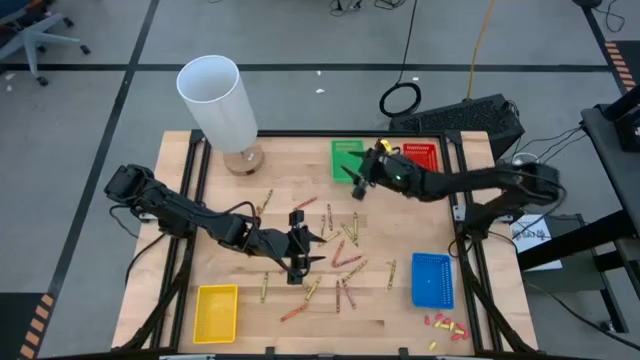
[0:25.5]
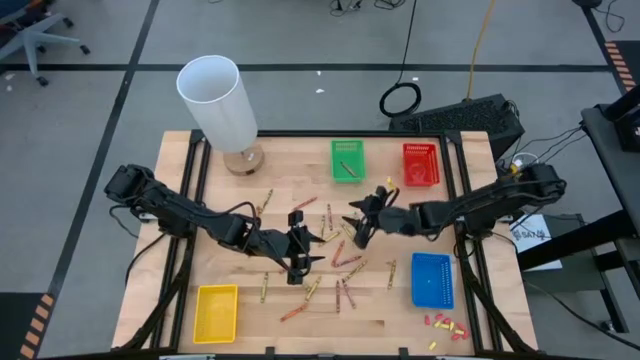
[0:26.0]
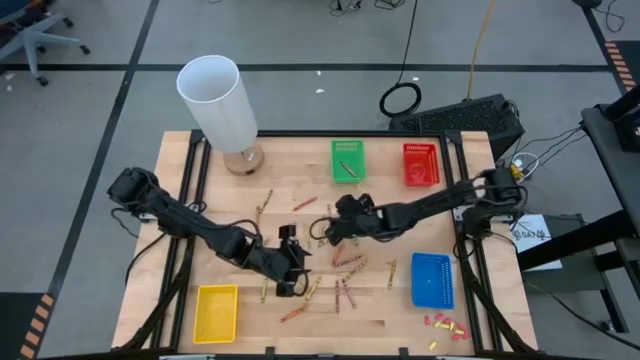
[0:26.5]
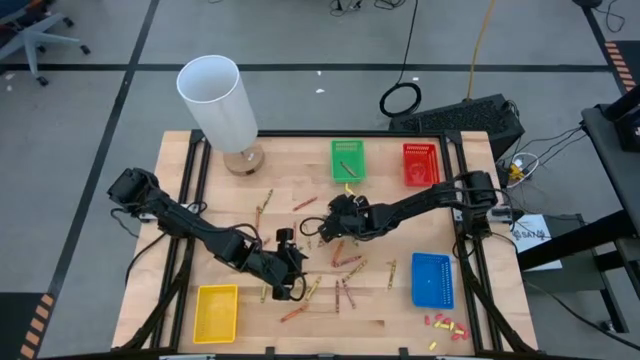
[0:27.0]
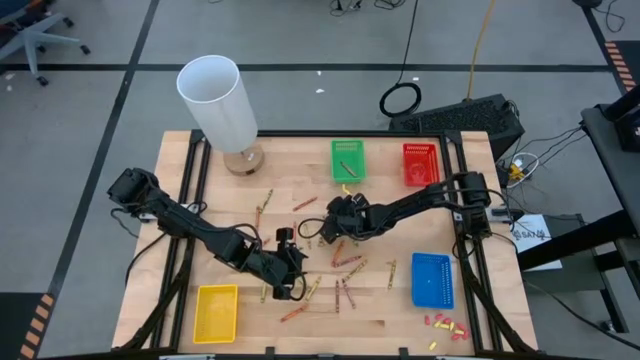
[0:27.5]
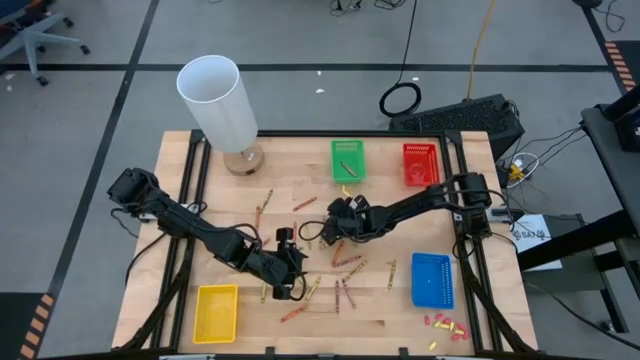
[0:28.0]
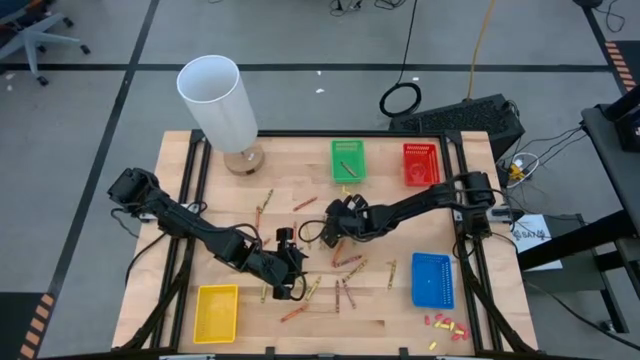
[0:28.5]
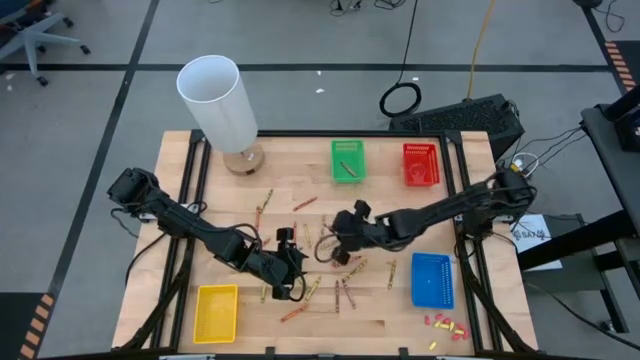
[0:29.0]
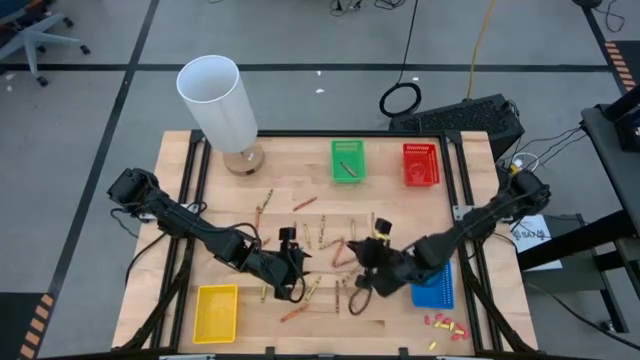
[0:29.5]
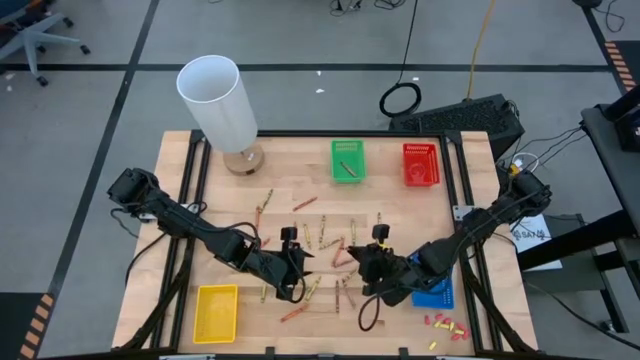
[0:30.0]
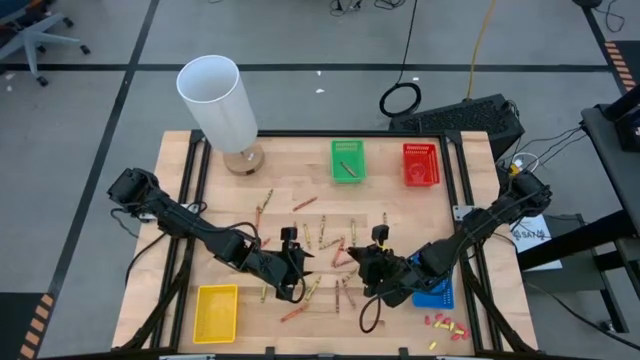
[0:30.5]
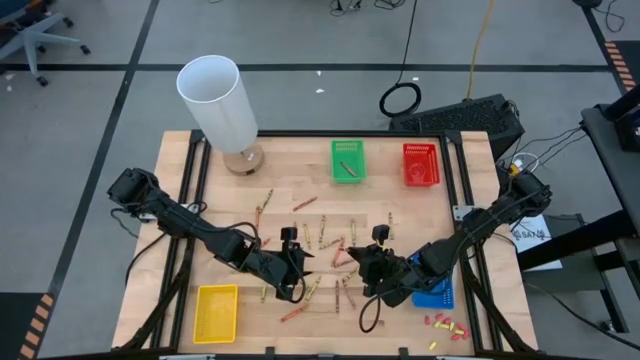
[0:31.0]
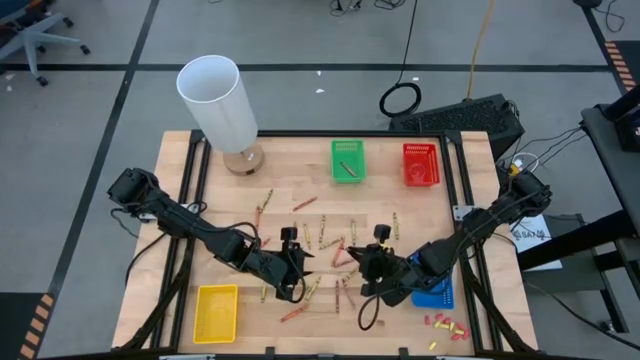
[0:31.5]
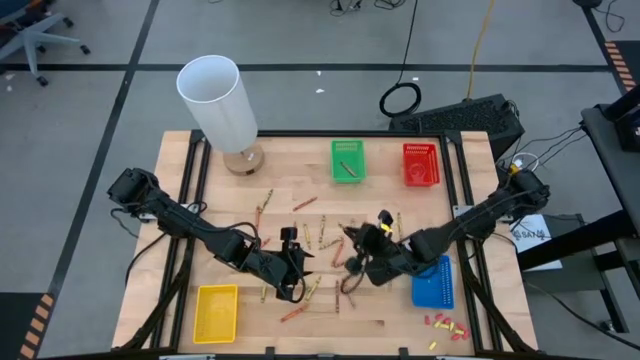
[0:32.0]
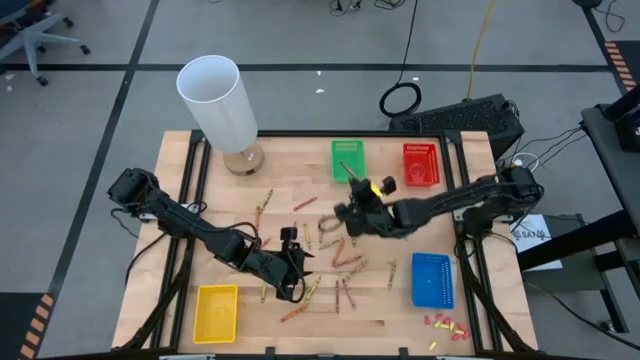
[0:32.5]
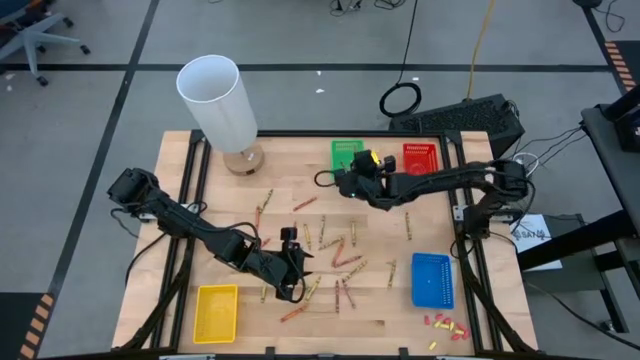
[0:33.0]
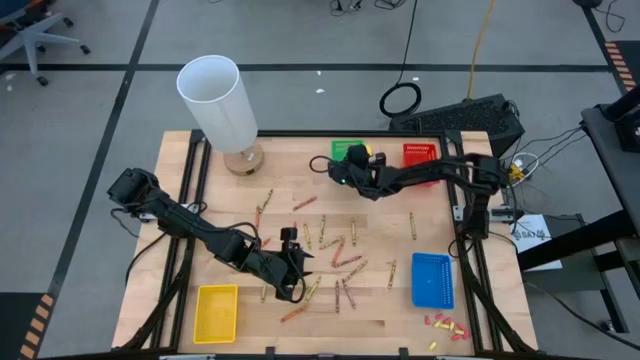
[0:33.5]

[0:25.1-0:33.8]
Task: Sort crayons
Put the red crayon into the green bin

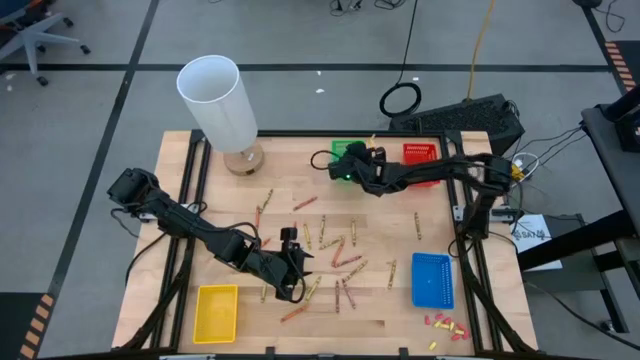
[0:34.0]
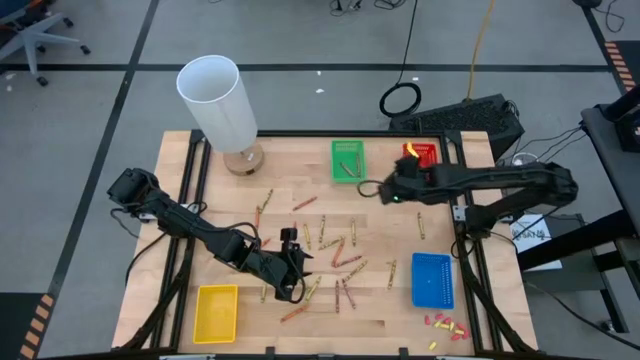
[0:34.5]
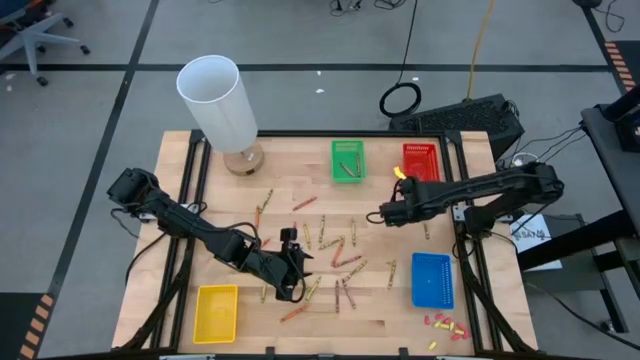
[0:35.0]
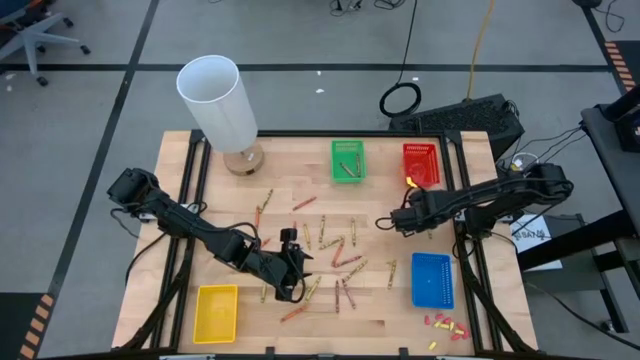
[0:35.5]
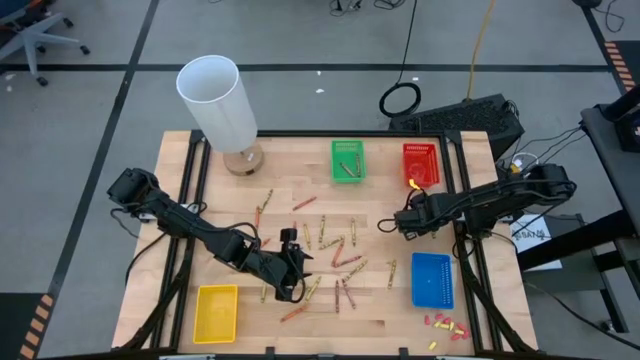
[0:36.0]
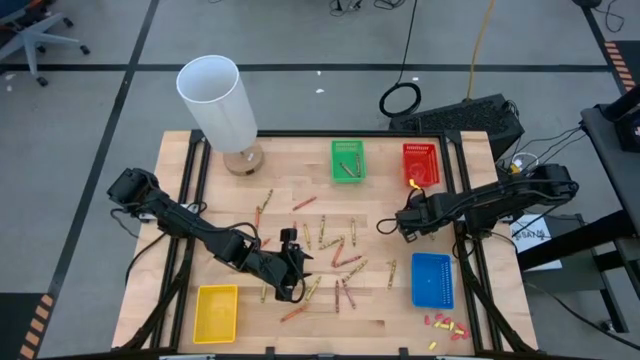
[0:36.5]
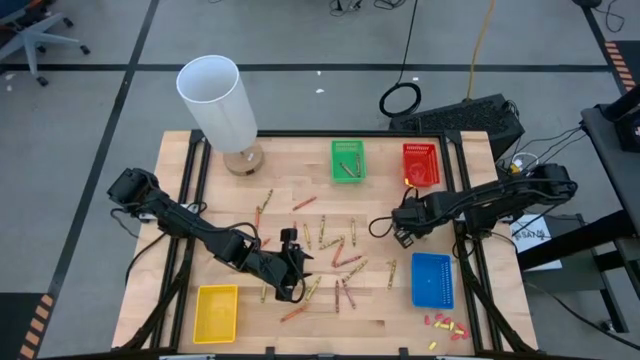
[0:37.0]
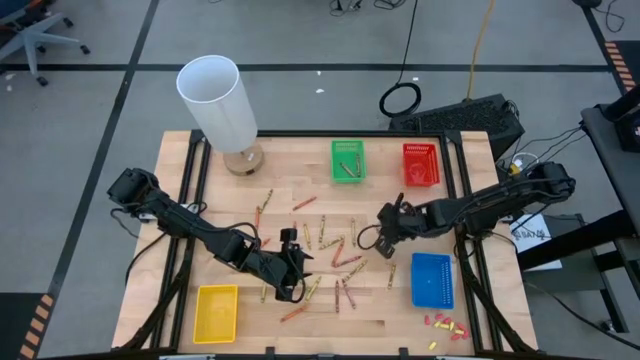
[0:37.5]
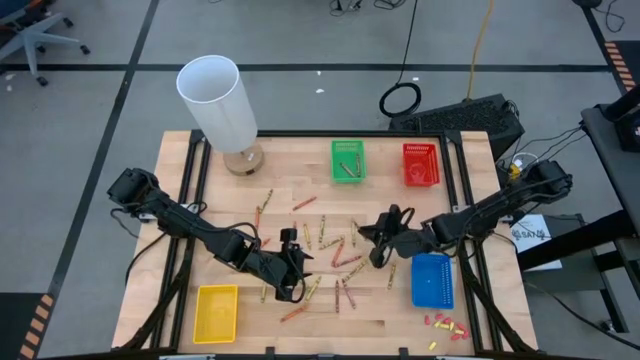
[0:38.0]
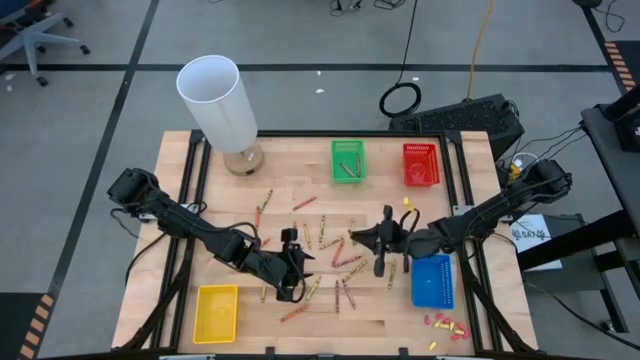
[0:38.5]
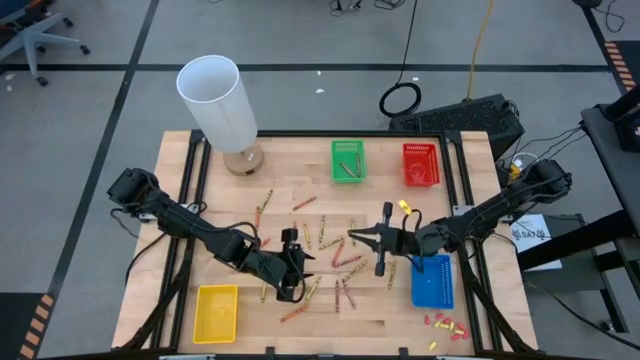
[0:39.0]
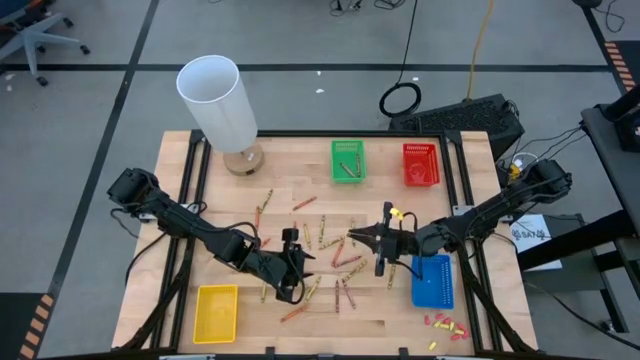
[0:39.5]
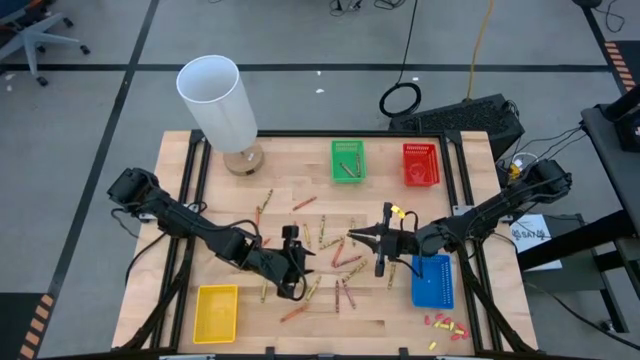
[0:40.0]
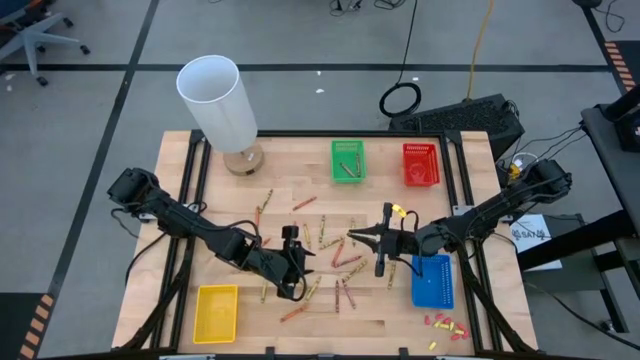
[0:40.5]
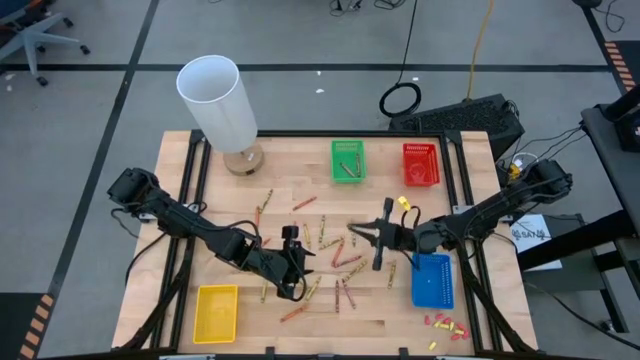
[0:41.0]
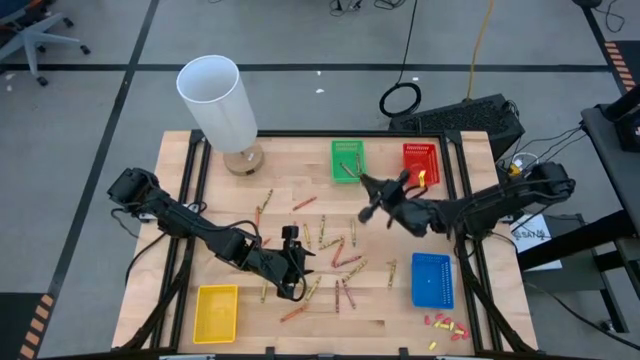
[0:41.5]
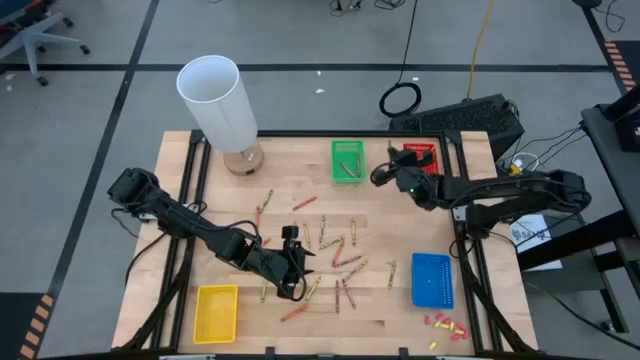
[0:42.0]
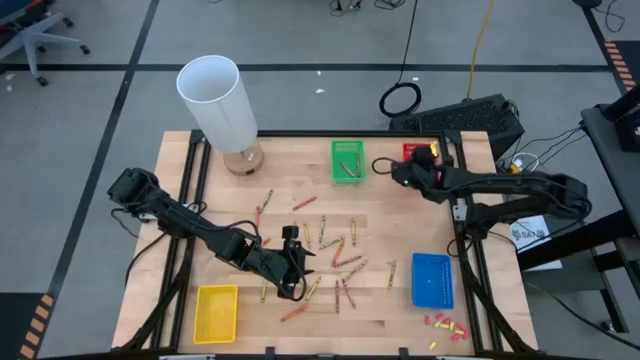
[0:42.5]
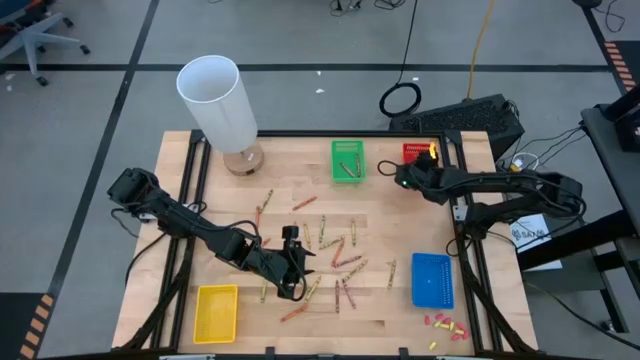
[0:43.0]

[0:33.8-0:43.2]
Put the green crayon into the red bin
